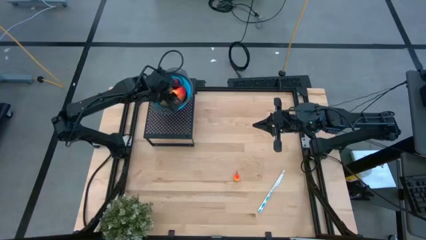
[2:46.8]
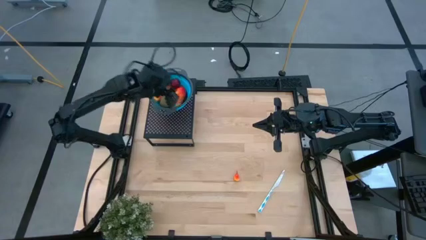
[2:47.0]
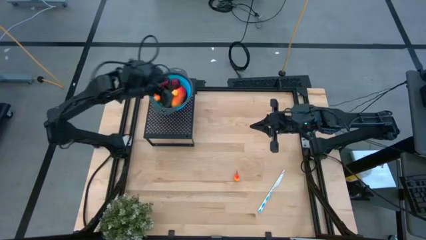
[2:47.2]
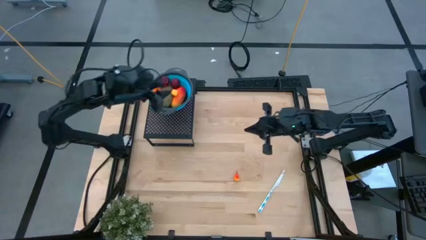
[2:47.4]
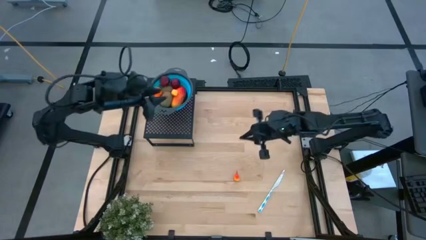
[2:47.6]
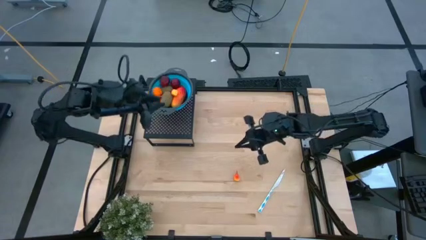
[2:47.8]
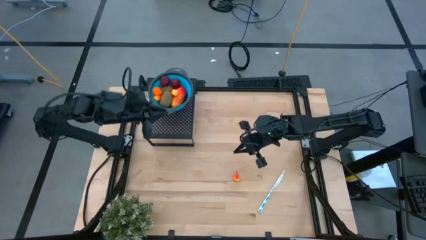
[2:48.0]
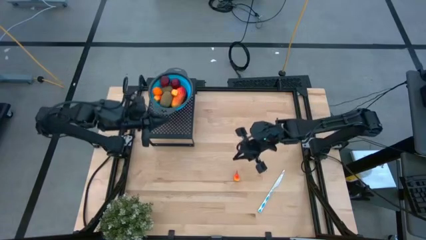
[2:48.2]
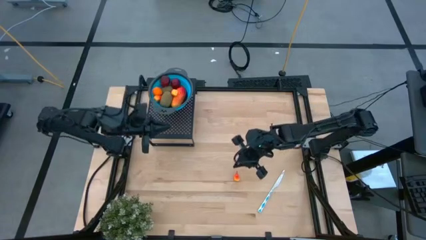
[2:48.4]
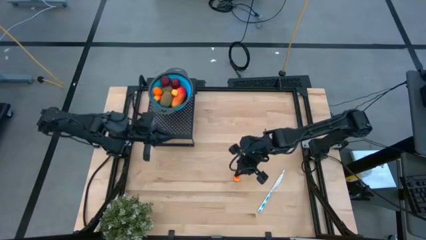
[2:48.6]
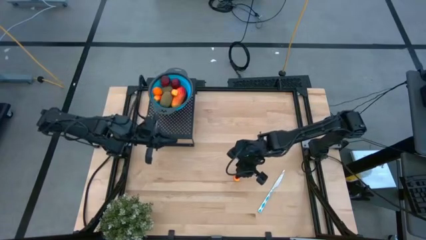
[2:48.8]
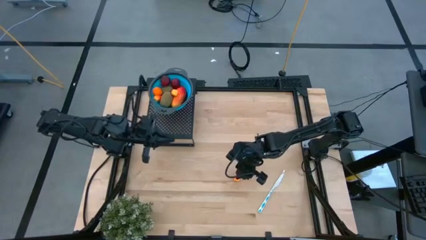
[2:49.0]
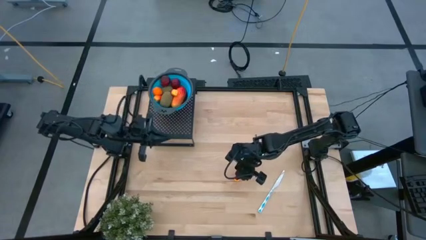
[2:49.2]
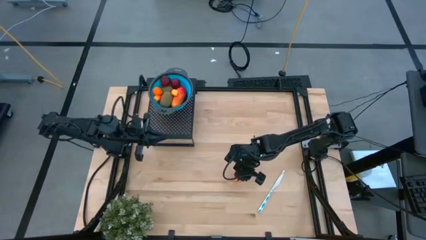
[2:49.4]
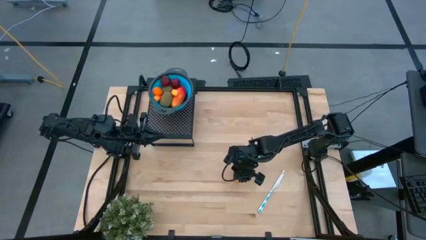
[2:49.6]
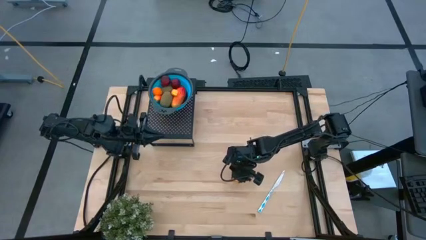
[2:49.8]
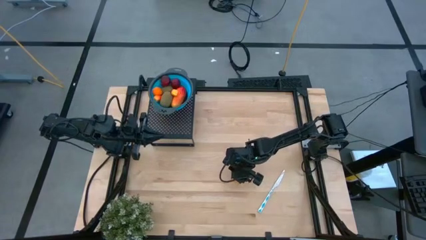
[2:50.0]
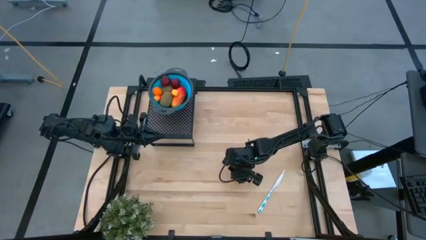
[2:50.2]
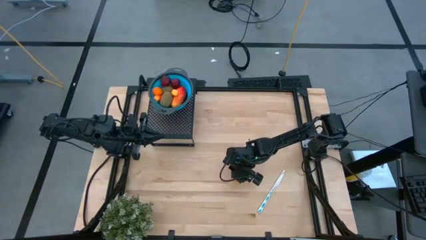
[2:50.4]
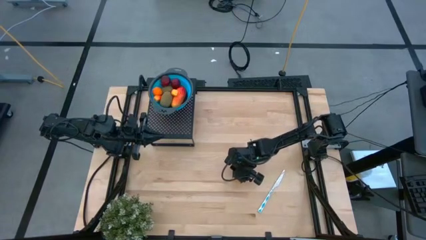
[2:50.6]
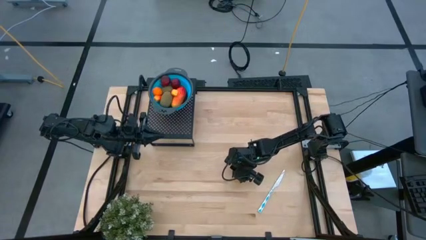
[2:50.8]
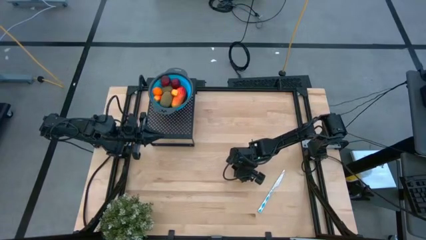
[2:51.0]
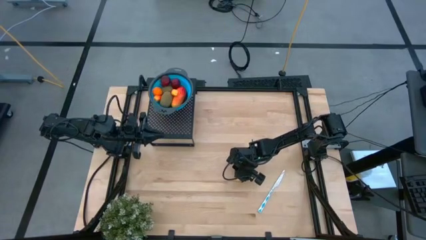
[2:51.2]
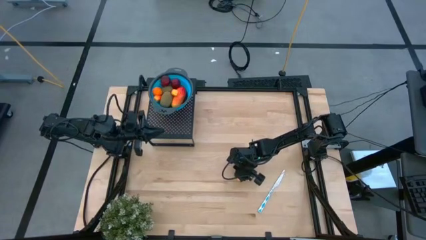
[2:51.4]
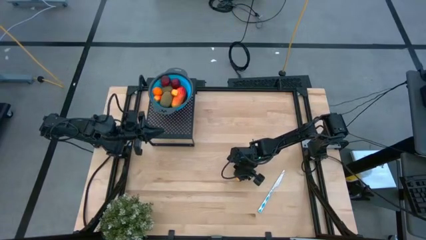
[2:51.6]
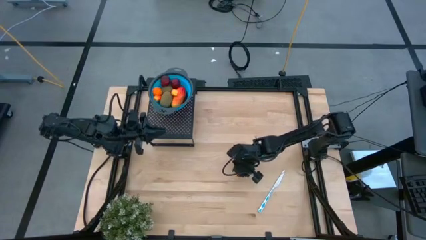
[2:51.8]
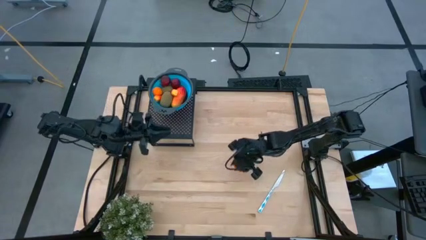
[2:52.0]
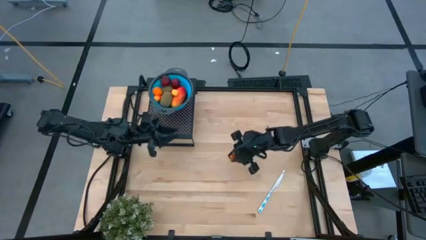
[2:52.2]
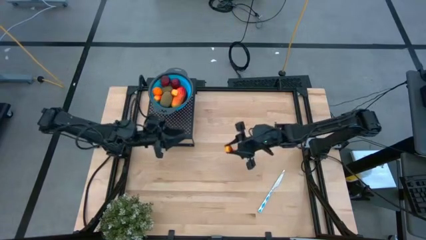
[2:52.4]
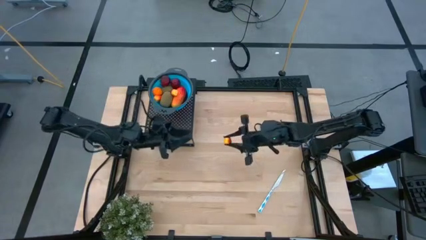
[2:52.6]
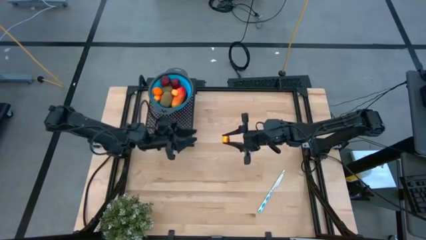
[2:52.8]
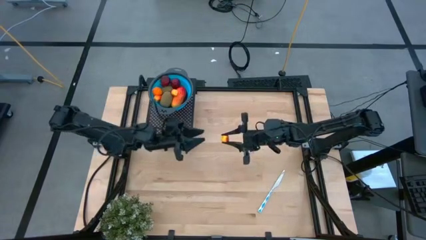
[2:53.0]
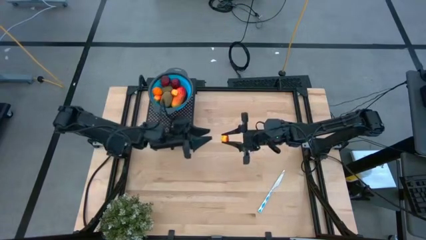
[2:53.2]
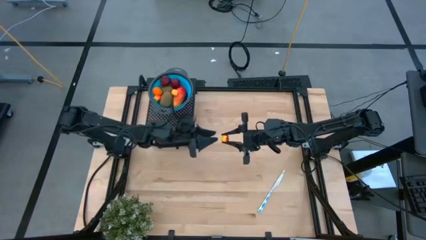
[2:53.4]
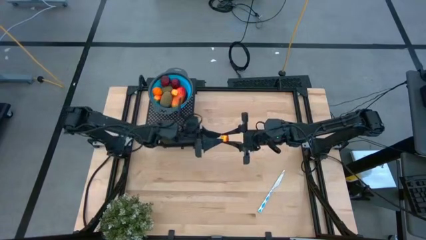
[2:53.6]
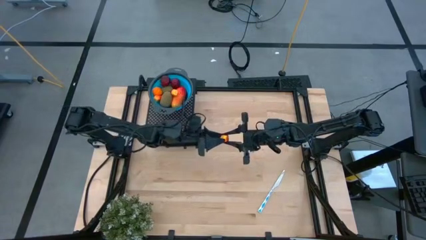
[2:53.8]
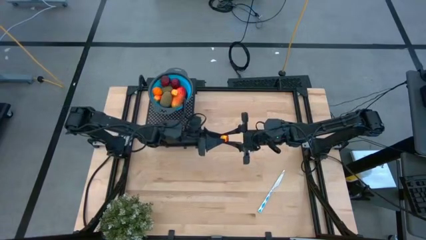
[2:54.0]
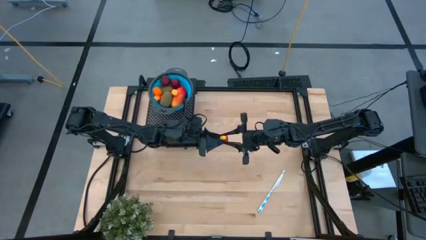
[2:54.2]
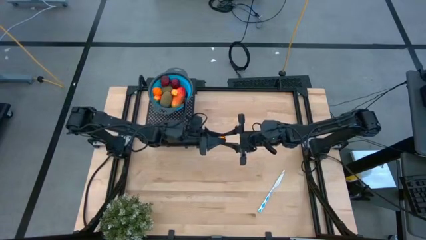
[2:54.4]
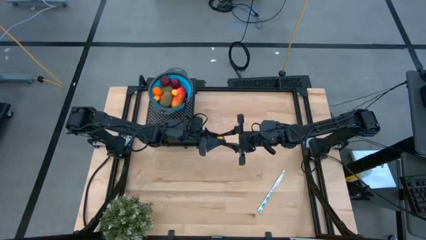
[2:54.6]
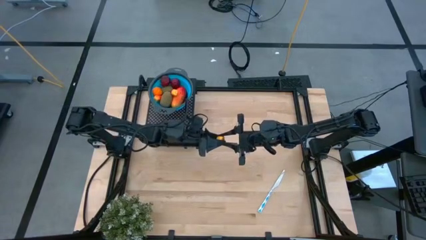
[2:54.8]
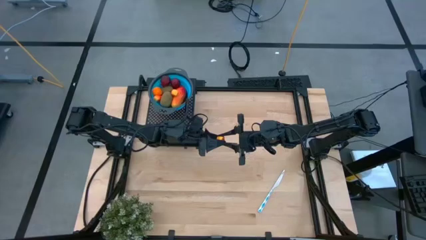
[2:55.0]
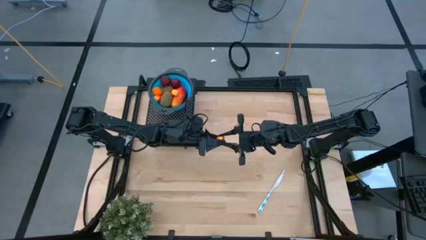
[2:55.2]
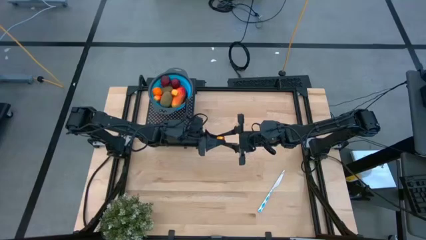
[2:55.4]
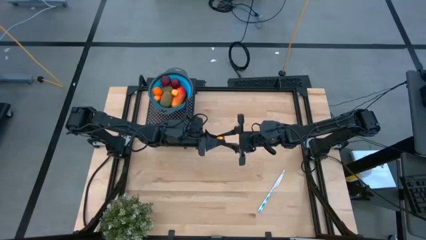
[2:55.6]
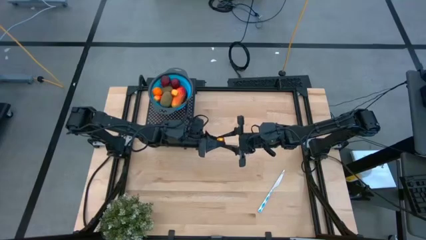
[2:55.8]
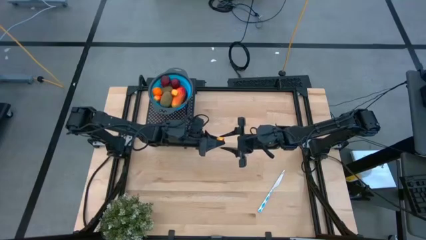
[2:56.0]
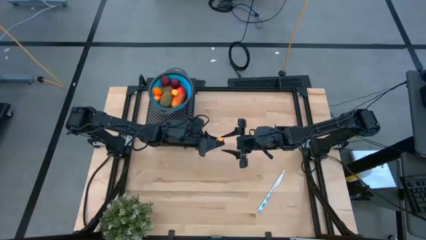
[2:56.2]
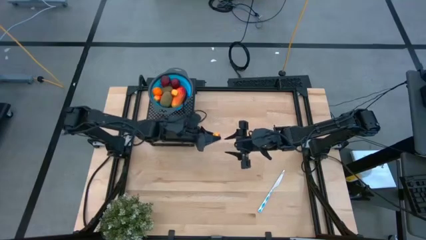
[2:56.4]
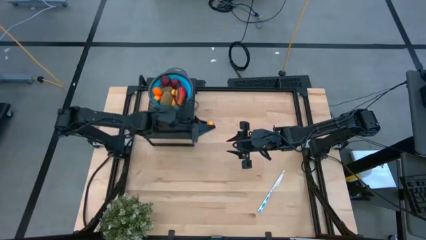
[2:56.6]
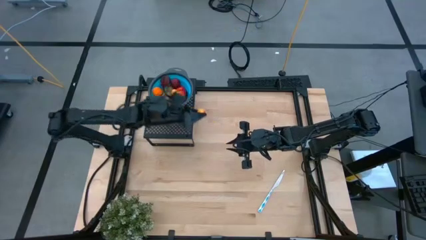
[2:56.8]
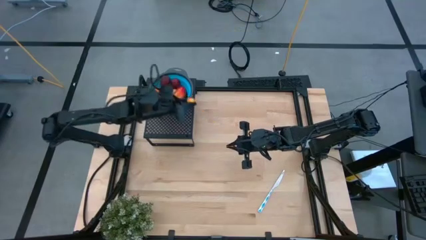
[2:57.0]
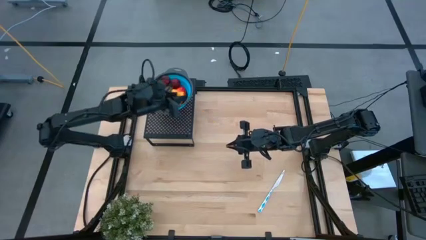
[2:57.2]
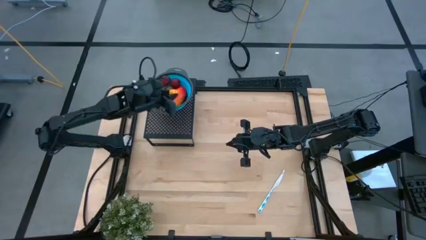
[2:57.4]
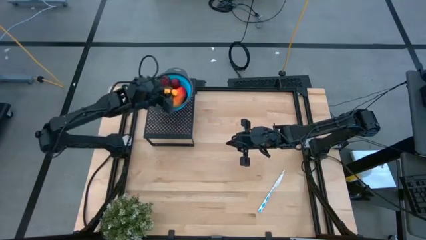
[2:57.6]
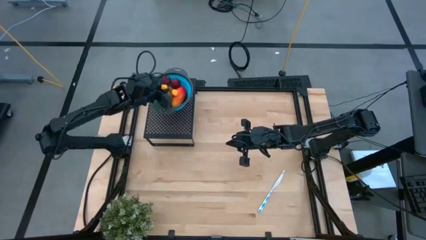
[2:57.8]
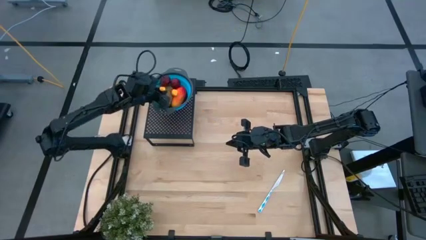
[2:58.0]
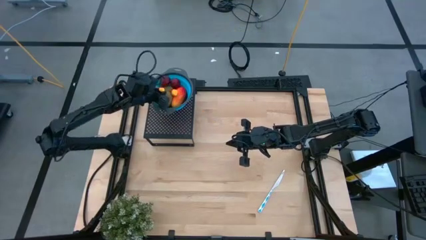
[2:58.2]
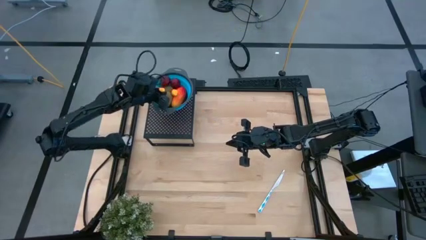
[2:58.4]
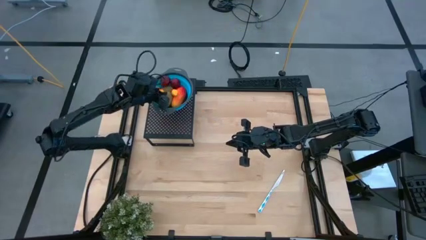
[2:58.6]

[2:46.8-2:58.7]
Task: Pick & Place Fruit
Put the peach into the blue strainer bowl on the shelf

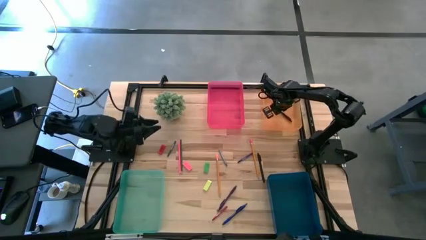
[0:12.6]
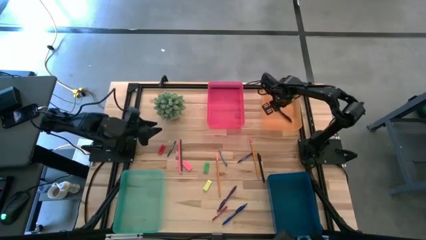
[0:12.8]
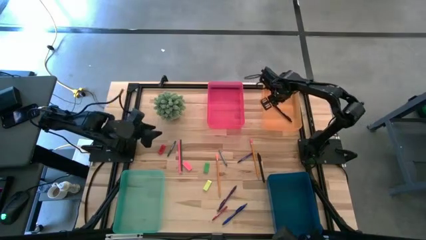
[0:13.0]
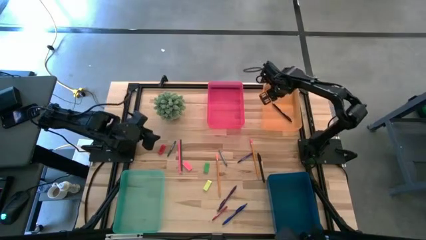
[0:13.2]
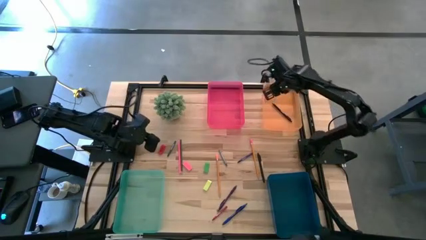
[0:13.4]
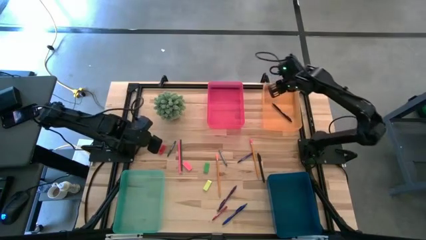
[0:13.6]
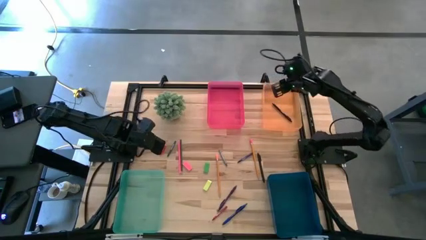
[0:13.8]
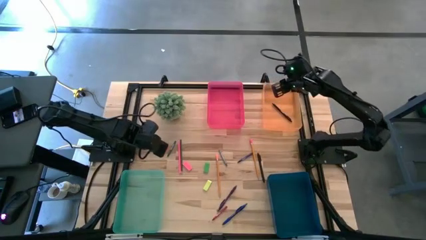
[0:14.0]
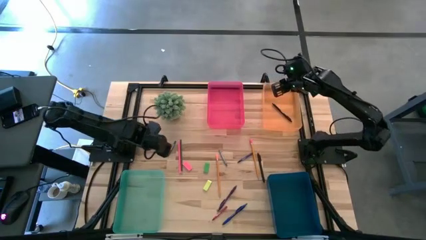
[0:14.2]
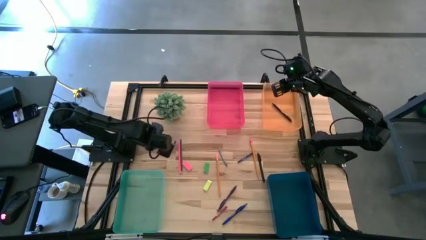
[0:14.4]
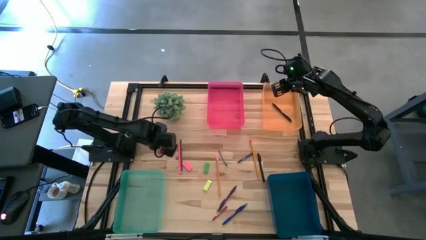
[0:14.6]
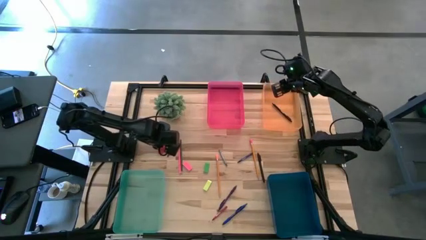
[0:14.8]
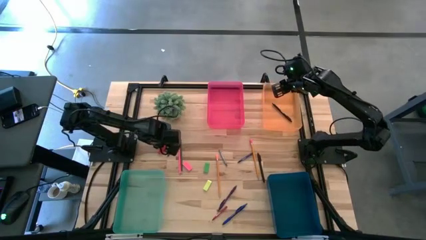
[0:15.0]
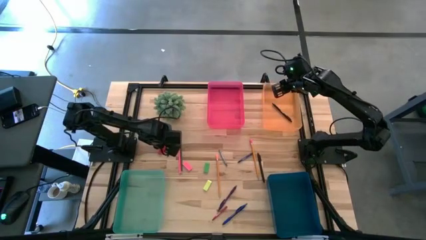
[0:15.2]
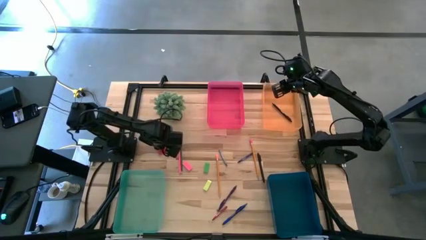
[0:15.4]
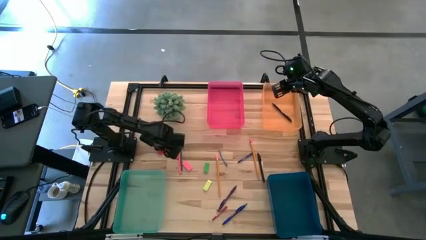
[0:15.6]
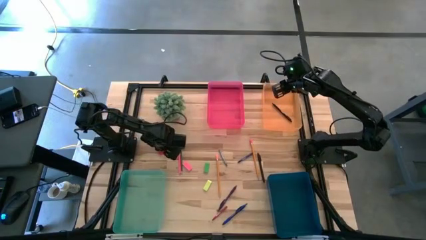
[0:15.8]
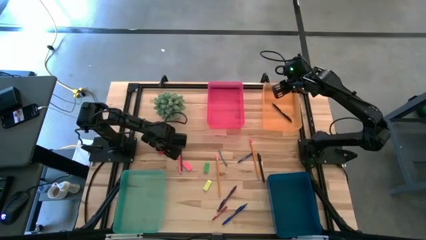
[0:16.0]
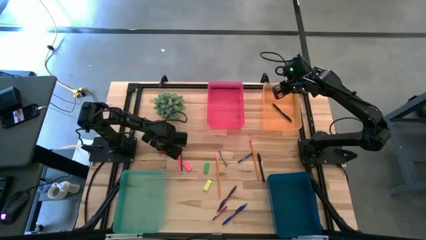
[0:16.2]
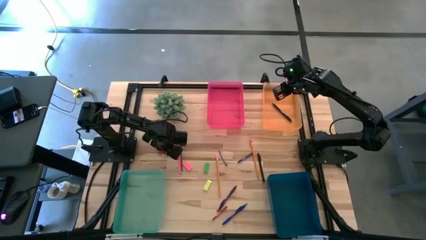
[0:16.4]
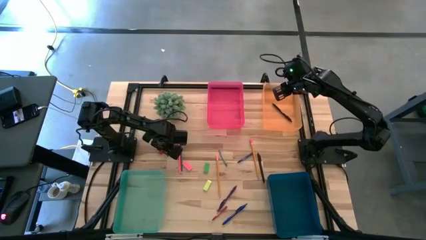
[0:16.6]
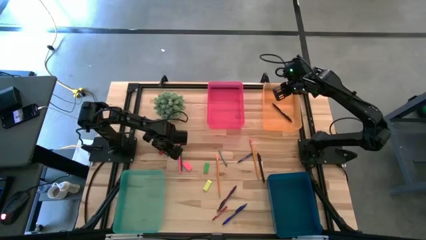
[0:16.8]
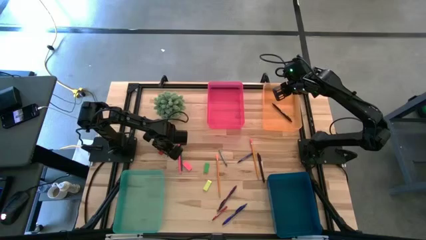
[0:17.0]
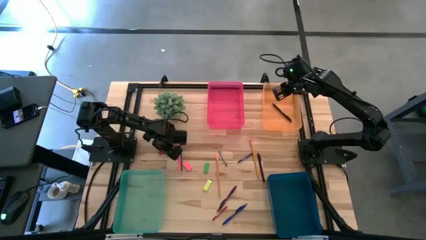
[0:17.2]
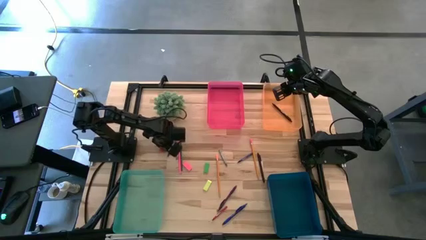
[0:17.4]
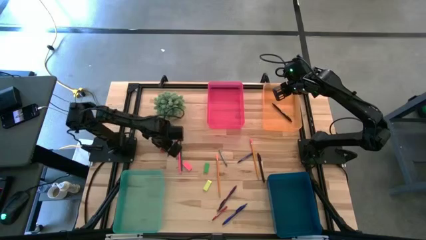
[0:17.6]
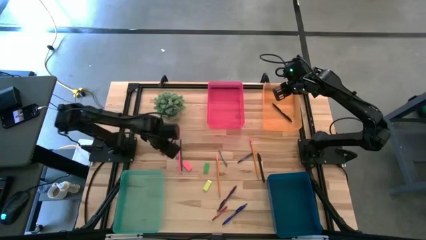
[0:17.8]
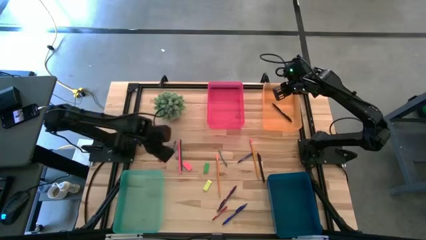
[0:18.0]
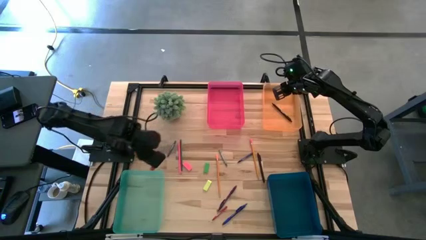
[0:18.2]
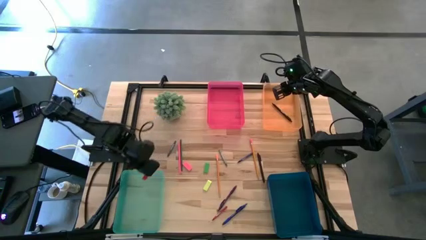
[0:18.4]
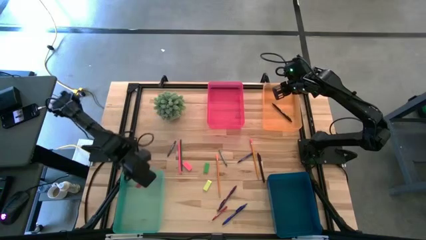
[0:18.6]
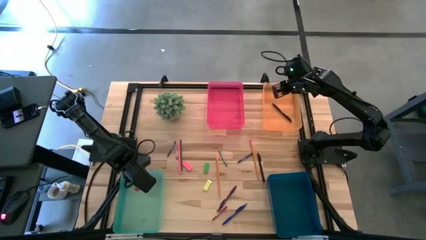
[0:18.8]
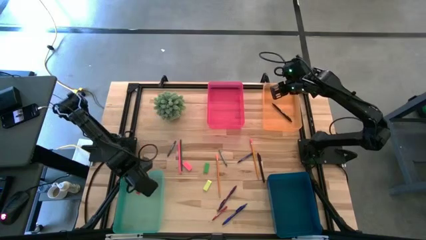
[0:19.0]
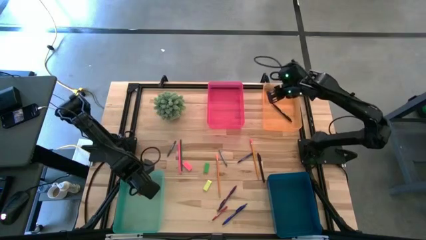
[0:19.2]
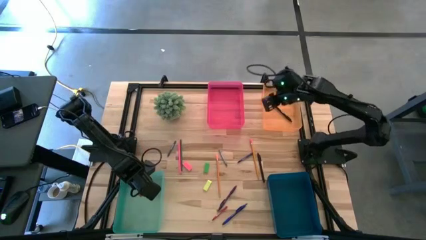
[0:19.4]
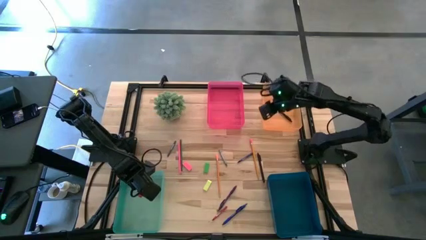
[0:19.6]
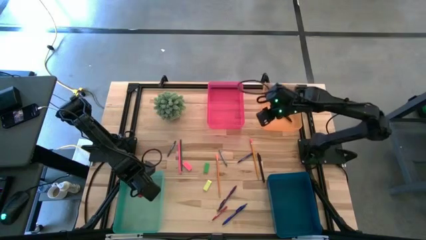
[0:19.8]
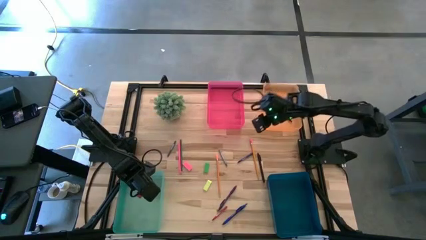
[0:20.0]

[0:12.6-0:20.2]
Task: Sort crayons/erasers/pens/pencils in bins
Put the red eraser into the green bin
